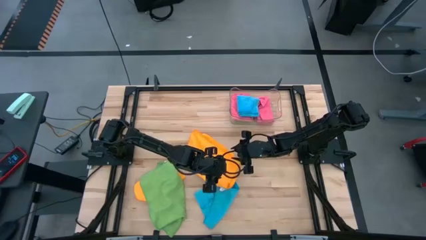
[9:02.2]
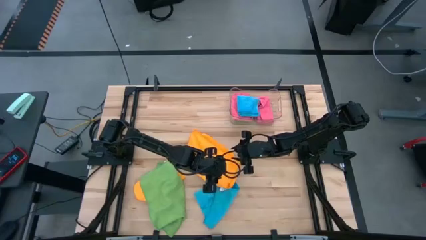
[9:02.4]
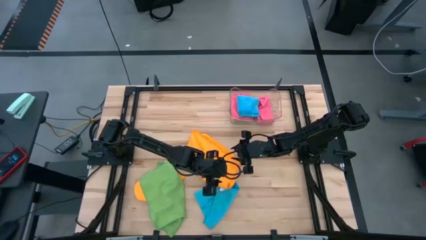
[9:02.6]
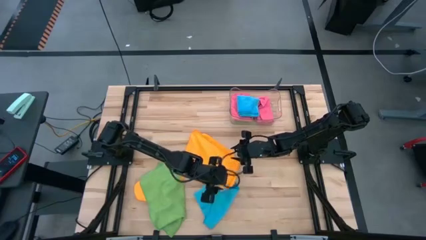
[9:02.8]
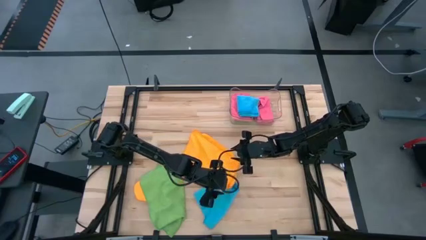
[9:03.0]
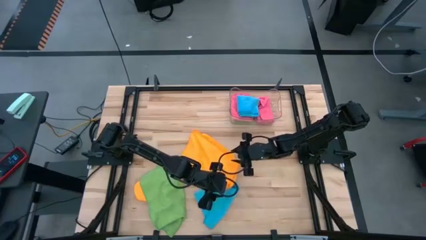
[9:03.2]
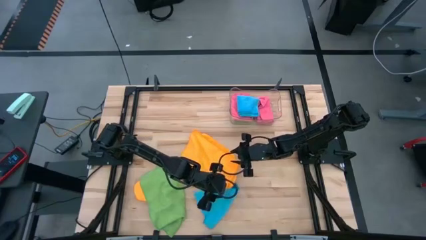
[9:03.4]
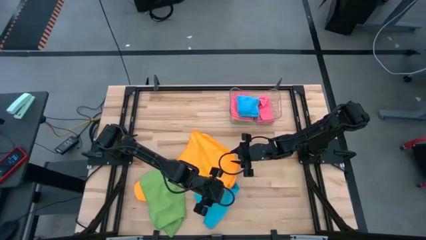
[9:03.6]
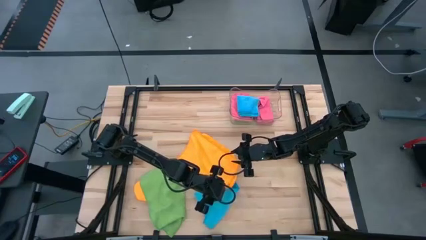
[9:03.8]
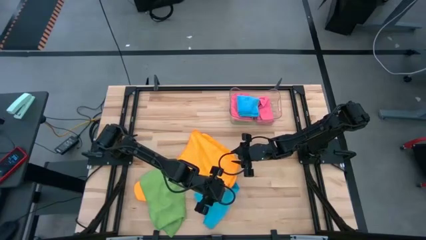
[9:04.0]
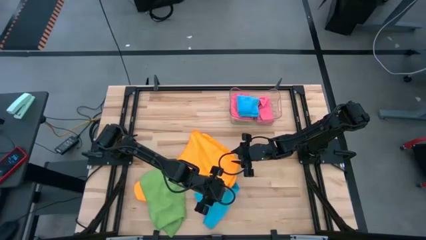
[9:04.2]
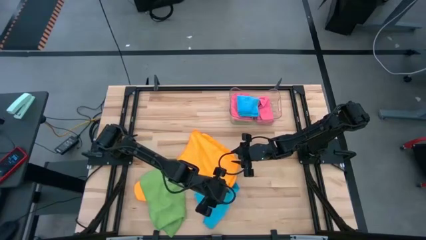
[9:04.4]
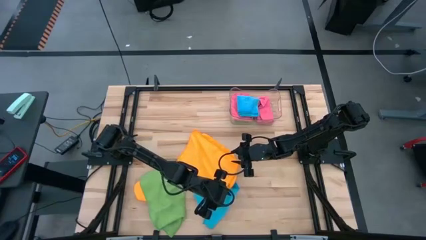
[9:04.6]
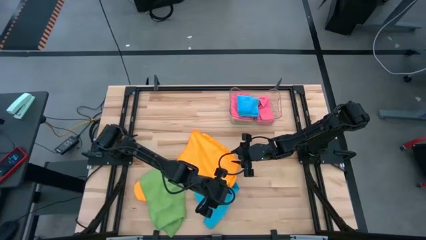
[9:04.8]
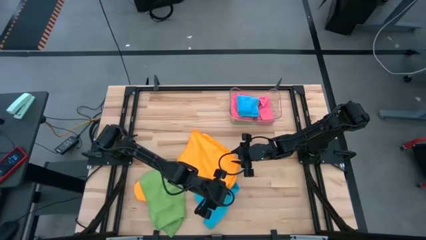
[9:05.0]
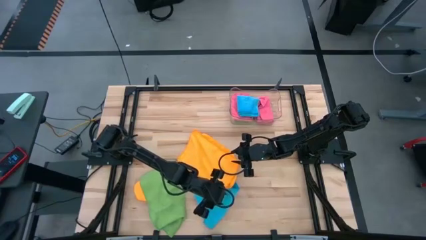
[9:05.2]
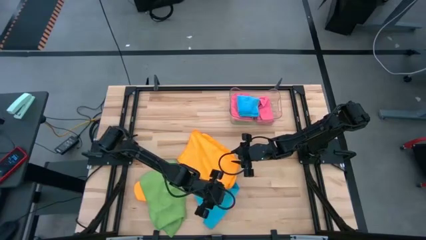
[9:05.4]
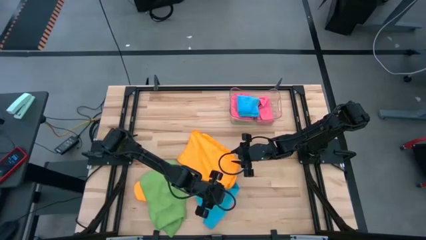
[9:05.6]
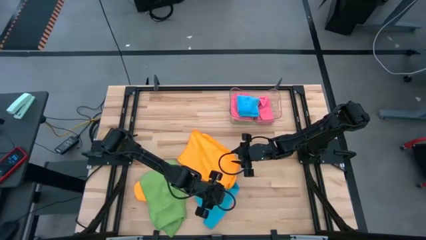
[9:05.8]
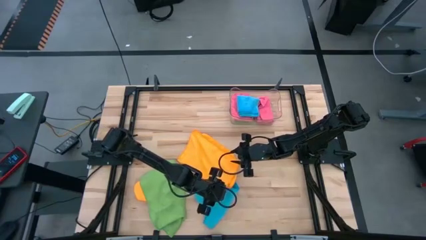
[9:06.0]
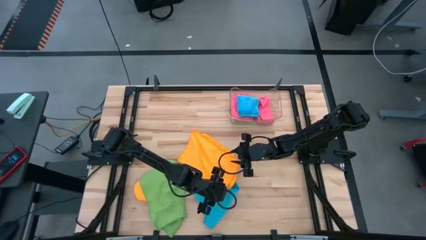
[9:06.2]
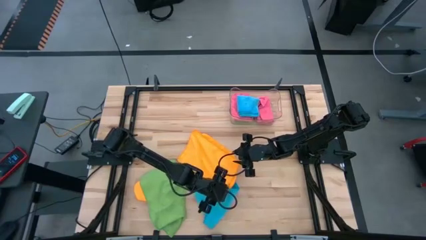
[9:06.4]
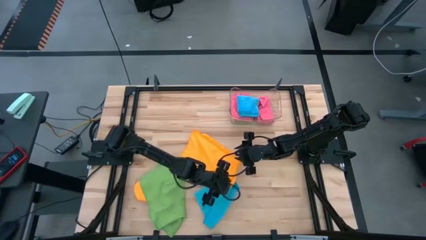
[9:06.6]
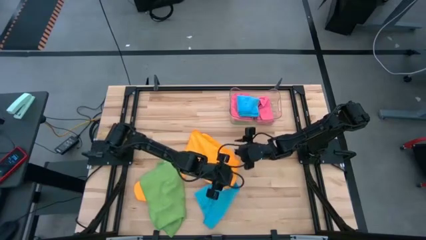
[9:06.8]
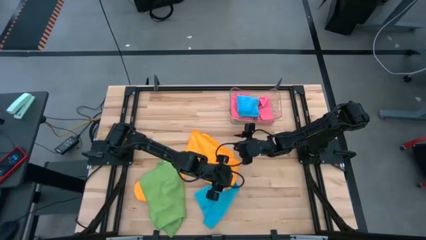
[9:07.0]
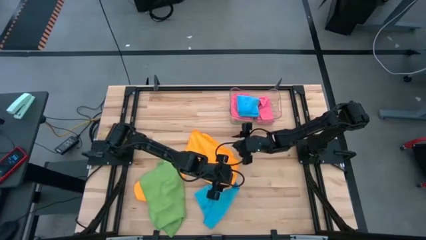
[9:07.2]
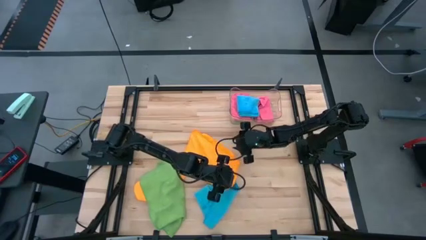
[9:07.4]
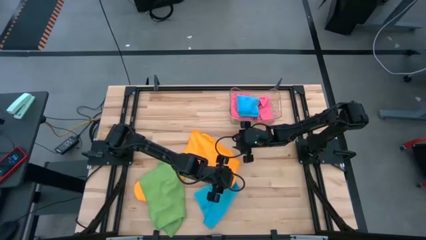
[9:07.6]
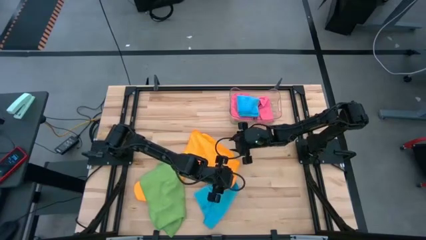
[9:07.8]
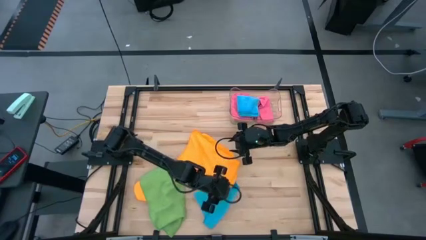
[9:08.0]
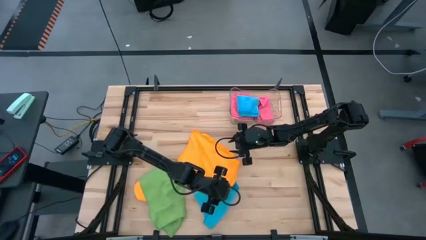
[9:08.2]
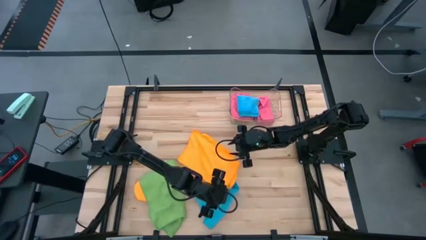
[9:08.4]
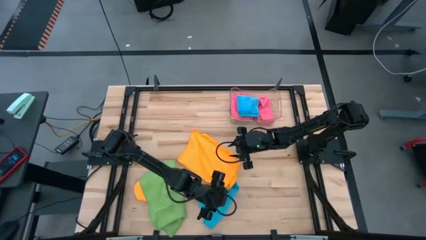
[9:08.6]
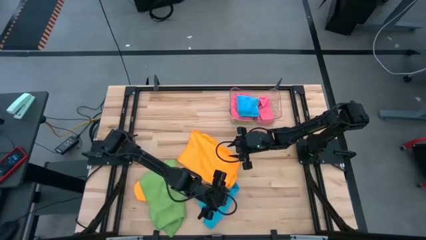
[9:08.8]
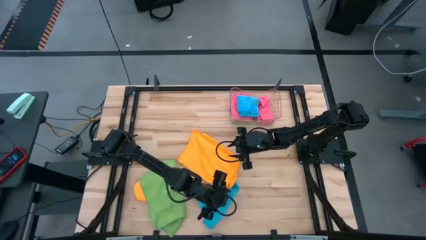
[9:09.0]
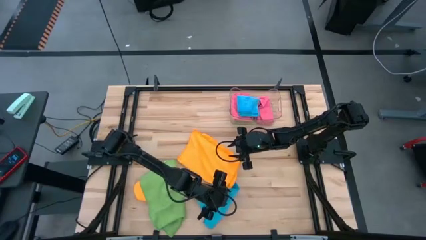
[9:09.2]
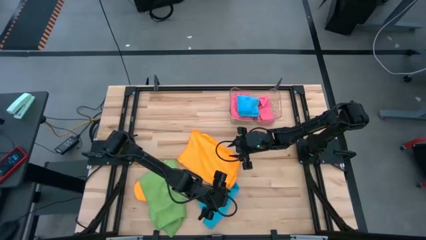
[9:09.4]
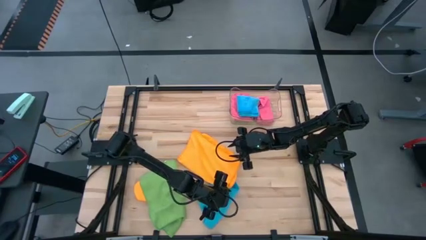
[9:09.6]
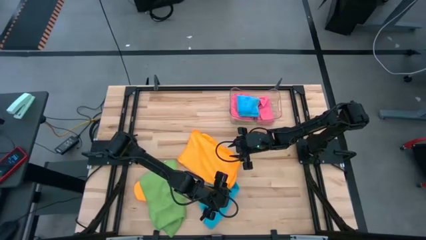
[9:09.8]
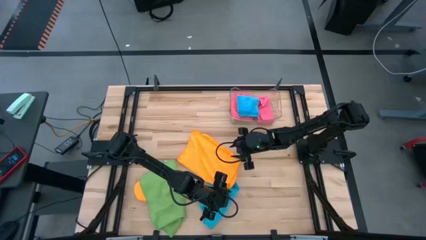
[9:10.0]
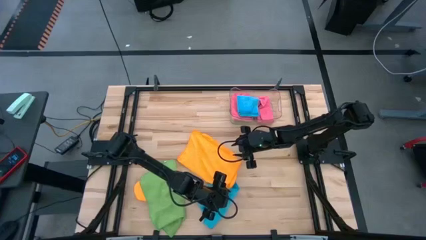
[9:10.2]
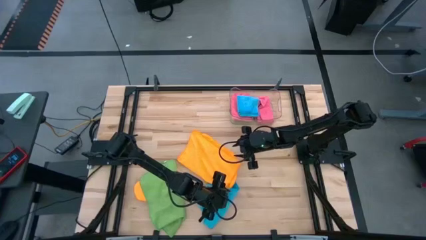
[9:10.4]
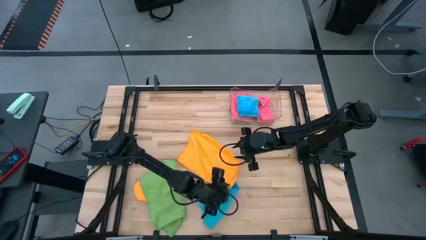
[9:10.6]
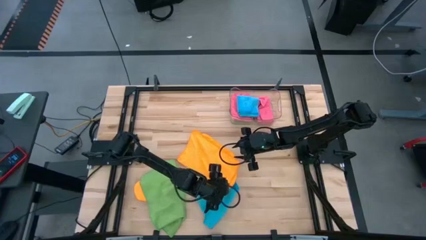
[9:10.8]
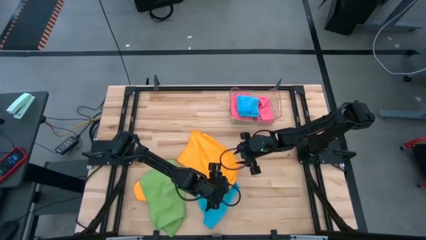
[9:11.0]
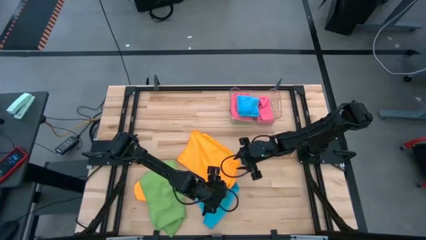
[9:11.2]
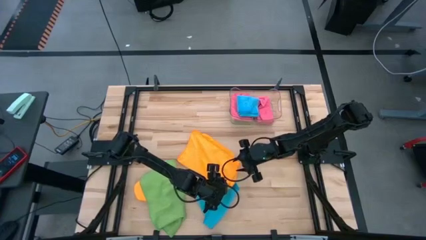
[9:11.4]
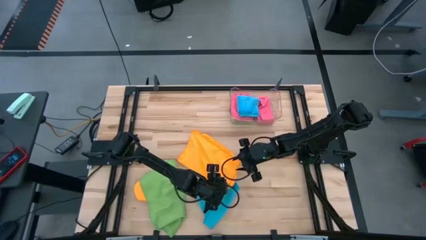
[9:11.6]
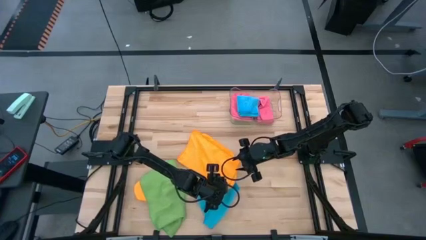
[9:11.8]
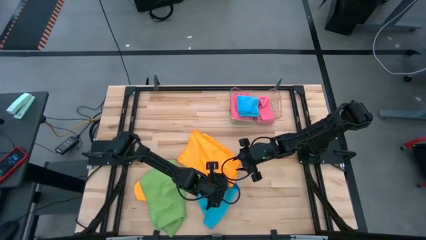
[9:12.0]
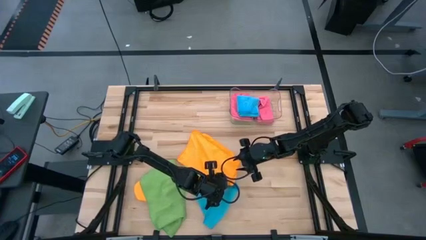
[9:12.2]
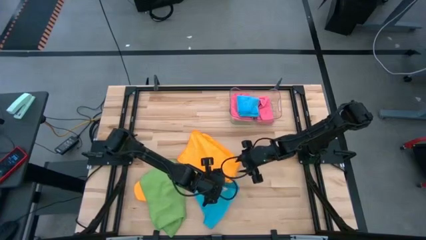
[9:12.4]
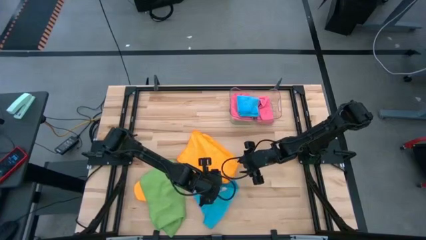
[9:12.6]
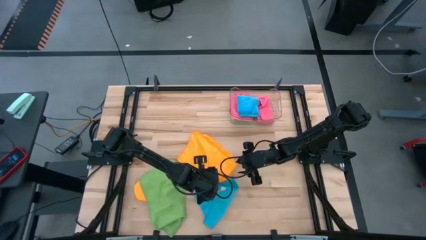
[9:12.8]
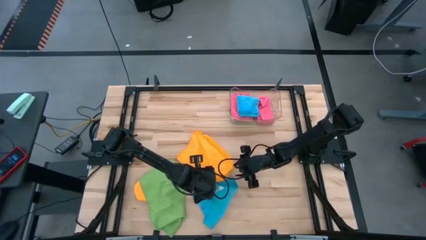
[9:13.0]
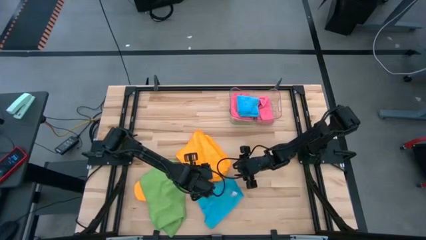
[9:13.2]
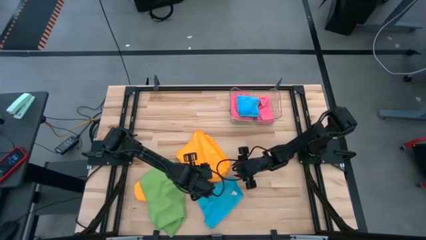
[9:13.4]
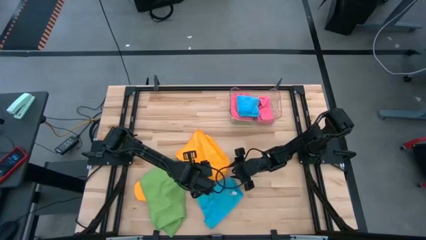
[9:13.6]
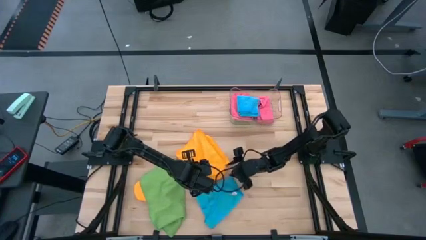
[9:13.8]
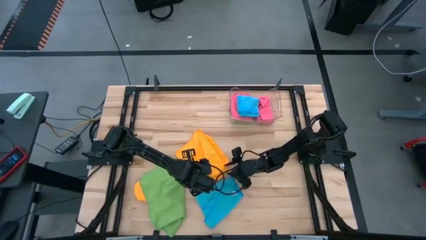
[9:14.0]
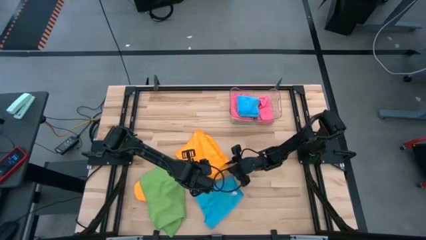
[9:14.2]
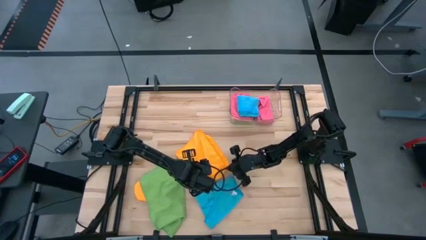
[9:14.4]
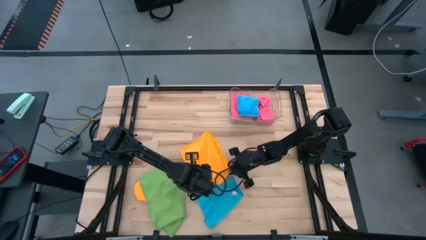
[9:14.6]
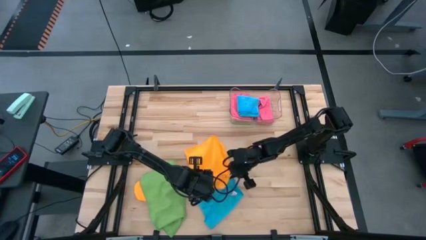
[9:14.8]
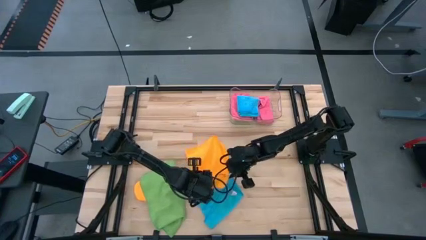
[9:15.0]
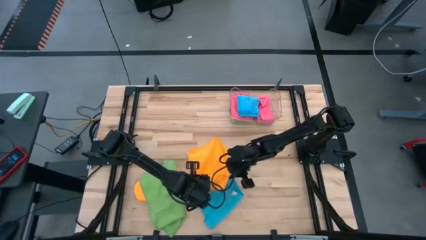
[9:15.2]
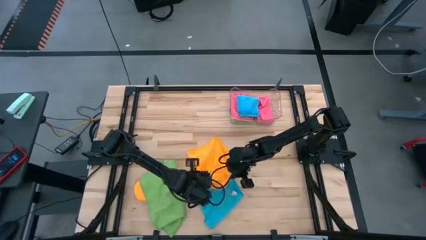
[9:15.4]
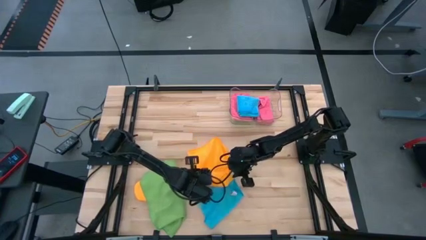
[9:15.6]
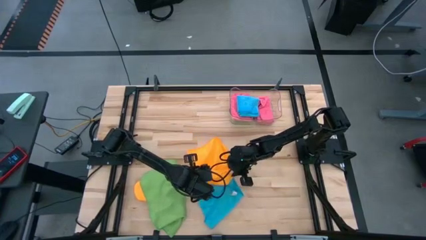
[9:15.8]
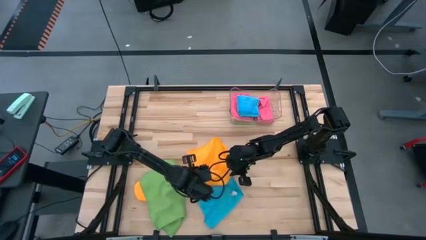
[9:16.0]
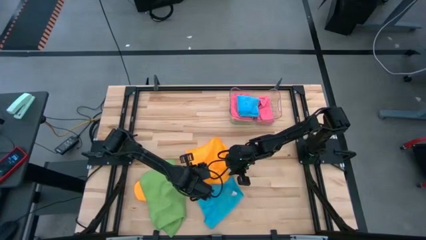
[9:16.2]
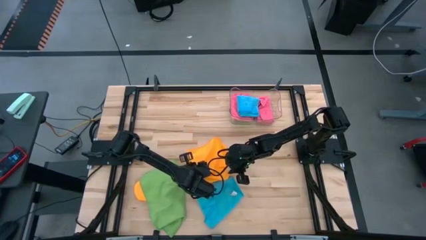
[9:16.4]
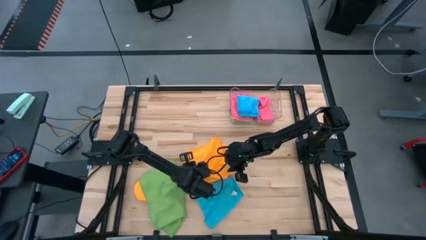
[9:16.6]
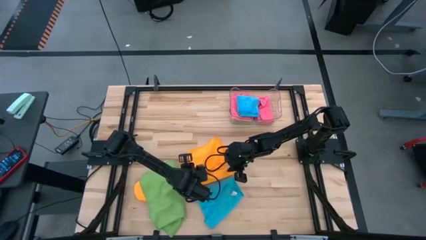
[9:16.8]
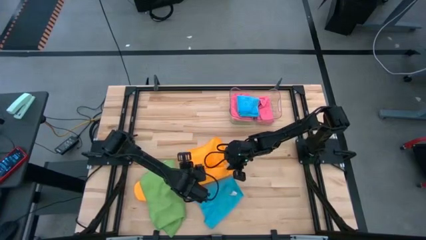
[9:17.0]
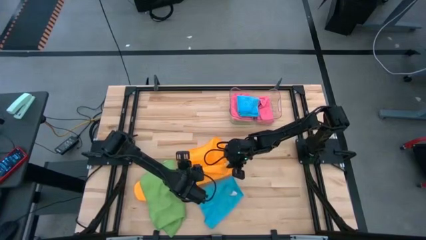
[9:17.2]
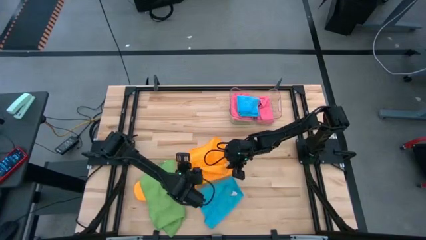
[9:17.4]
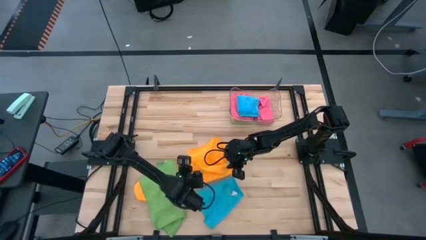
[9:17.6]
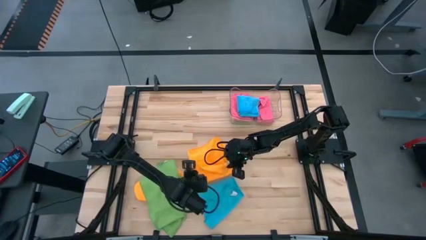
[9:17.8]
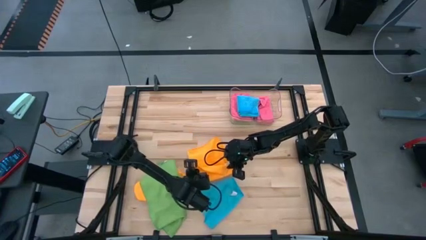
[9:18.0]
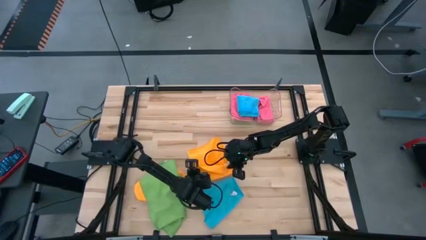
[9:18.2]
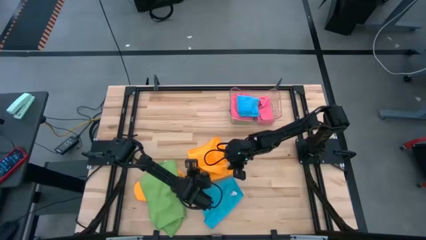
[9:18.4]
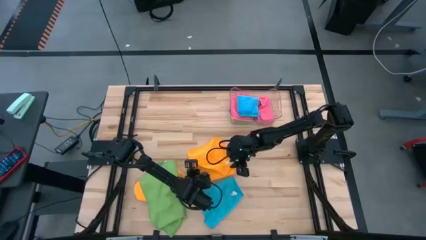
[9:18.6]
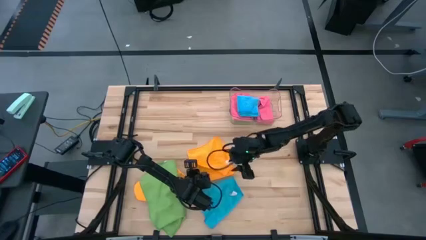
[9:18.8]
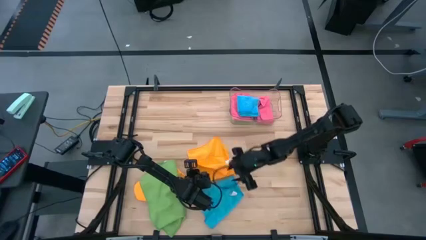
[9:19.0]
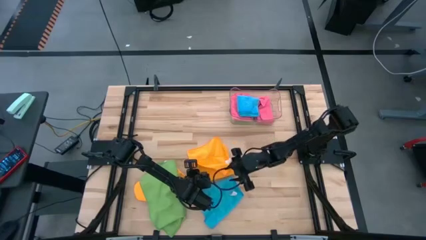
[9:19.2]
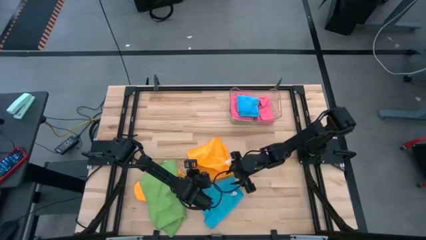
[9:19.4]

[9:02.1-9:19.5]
Task: Fold microfiber towels
Fold the right yellow towel
